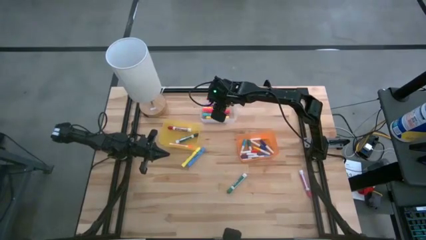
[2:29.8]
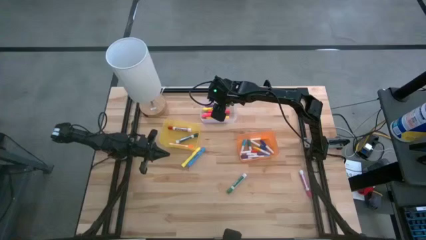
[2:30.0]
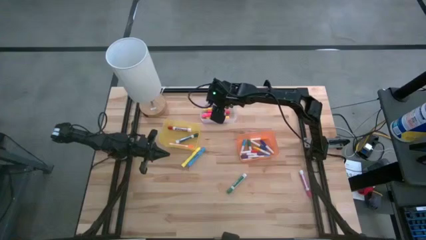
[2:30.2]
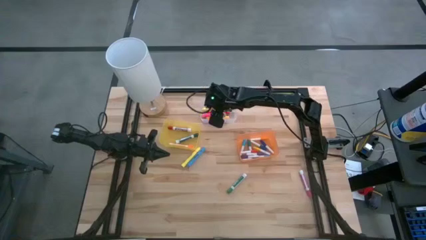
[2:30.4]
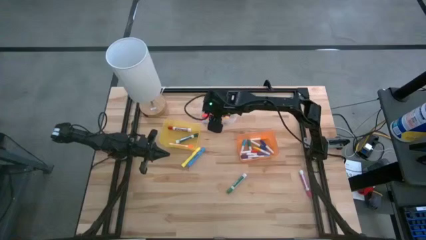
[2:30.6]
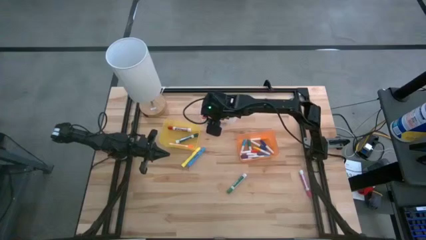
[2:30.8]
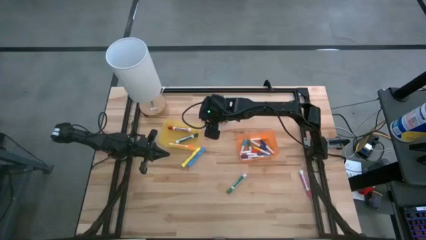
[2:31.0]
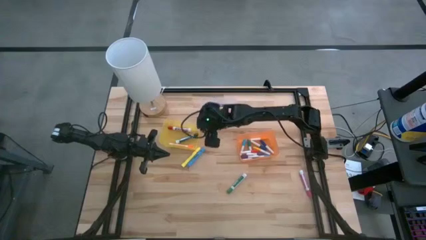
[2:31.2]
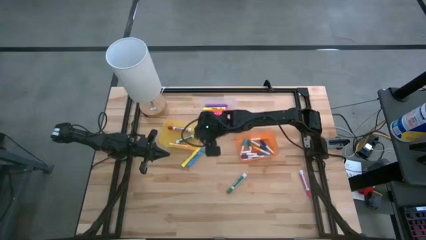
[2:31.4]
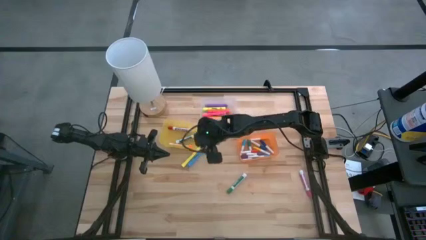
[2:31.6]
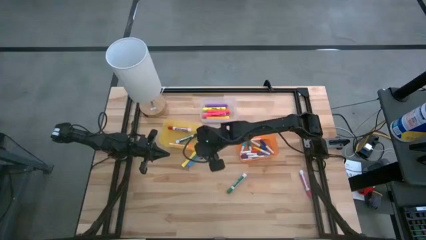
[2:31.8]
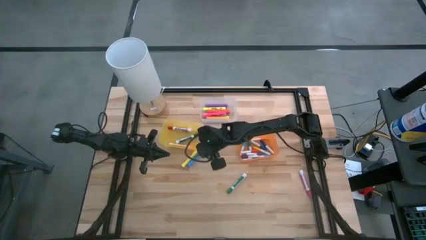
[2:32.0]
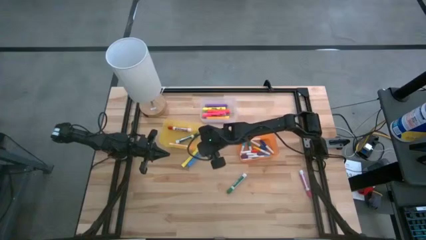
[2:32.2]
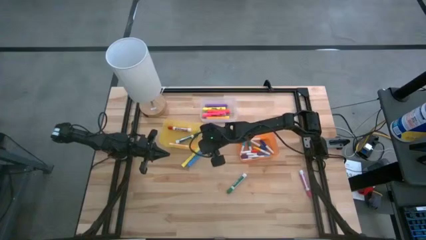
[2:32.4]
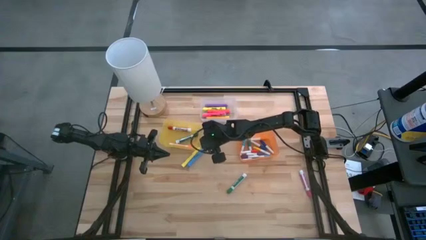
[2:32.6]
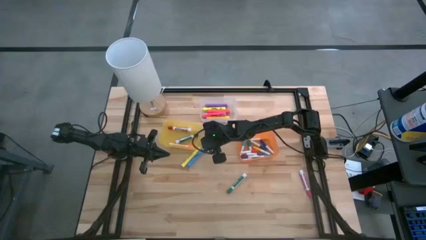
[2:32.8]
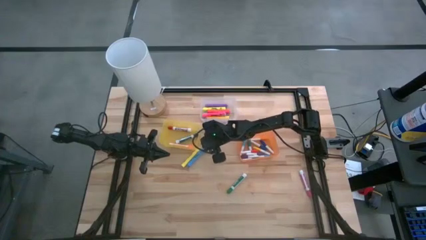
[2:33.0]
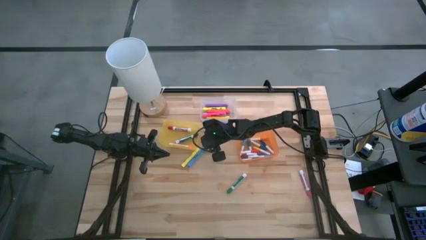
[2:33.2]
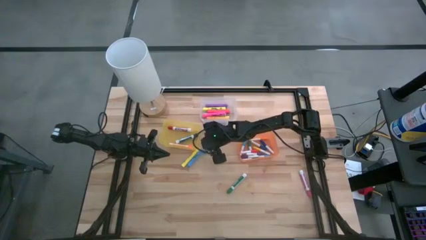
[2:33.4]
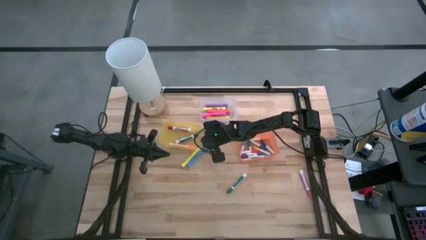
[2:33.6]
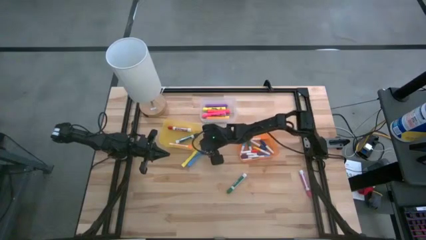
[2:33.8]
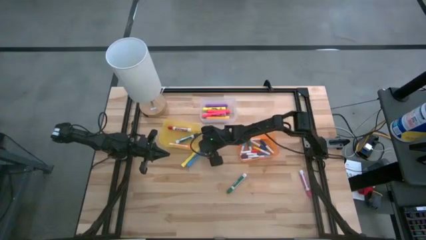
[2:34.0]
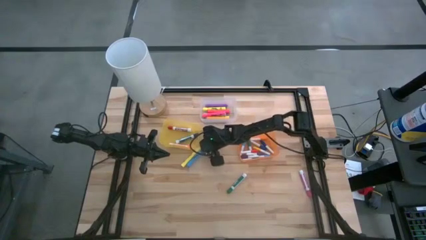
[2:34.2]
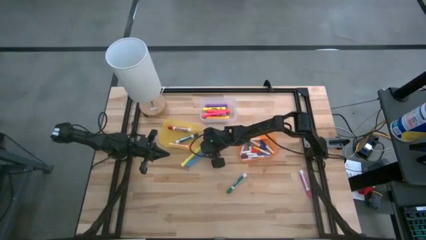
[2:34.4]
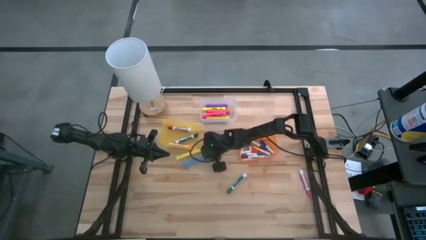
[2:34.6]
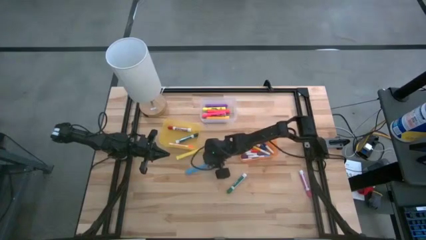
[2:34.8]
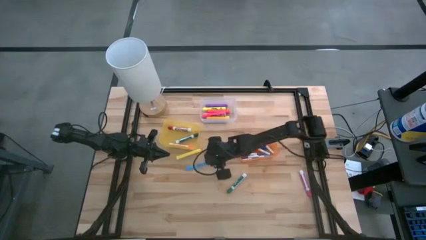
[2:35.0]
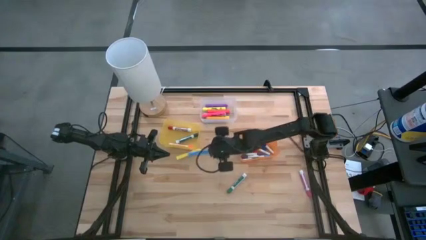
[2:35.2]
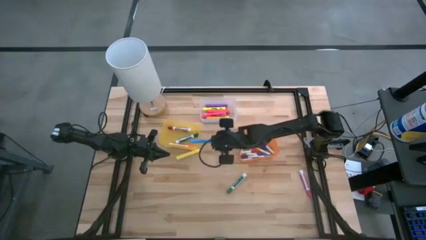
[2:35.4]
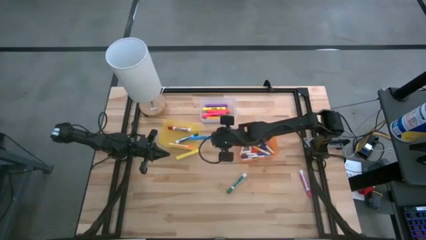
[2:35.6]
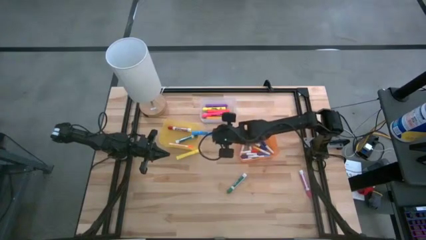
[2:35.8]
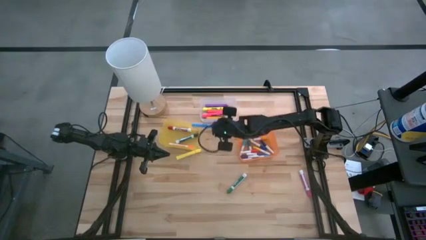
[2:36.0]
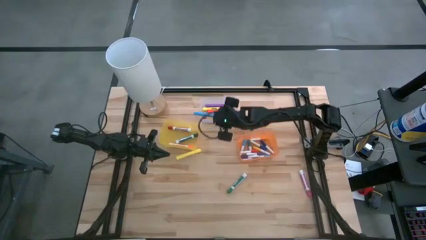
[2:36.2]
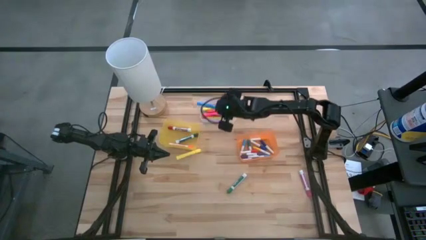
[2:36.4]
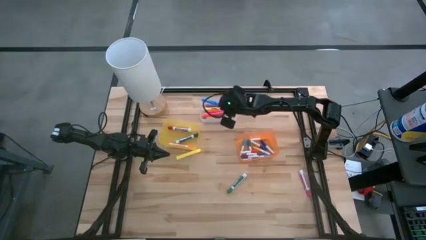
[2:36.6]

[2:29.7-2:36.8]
Task: Pick & Place Markers
Put the large blue highlighter pen into the transparent bin

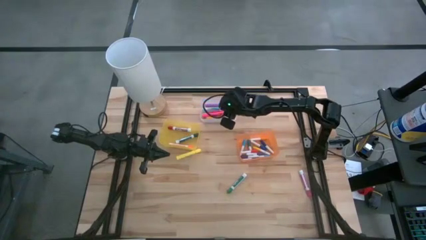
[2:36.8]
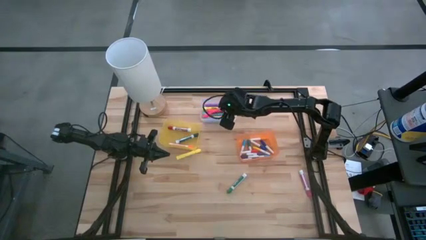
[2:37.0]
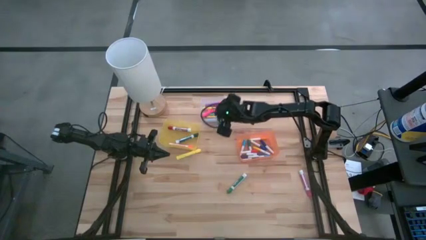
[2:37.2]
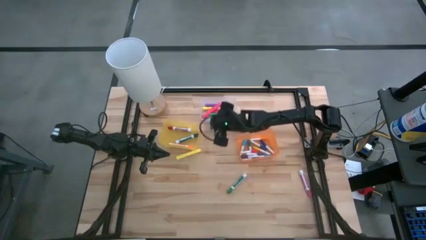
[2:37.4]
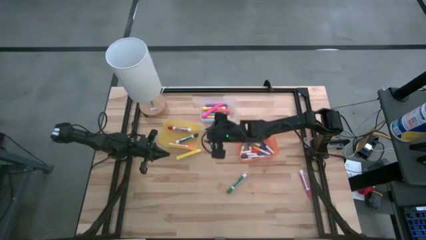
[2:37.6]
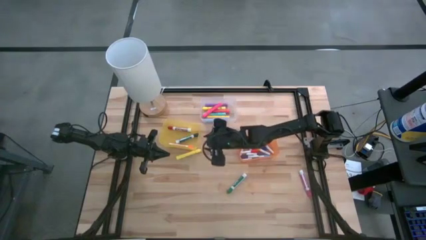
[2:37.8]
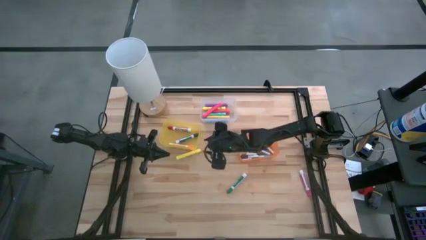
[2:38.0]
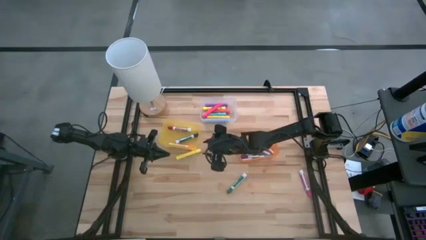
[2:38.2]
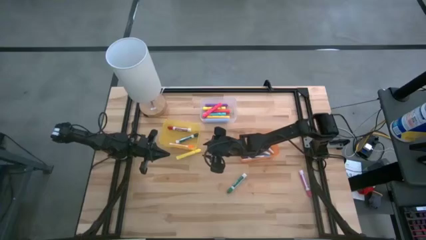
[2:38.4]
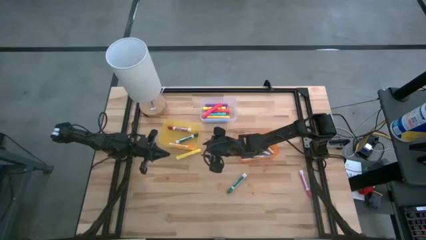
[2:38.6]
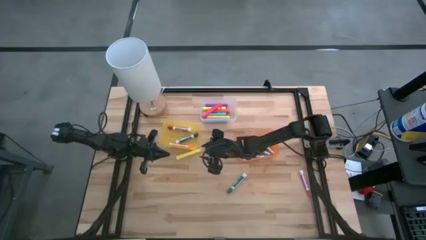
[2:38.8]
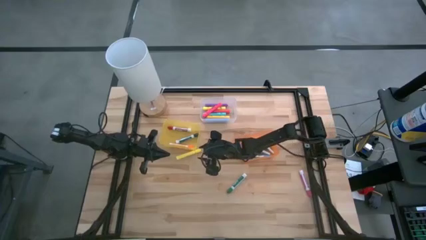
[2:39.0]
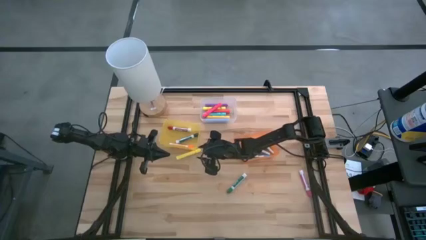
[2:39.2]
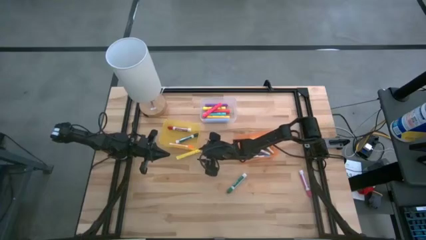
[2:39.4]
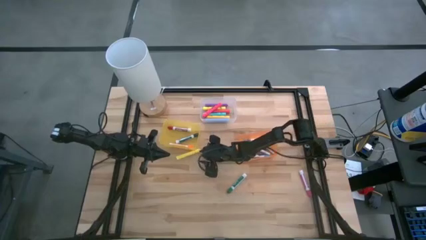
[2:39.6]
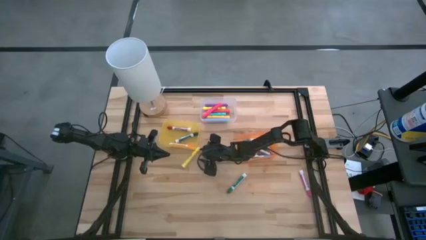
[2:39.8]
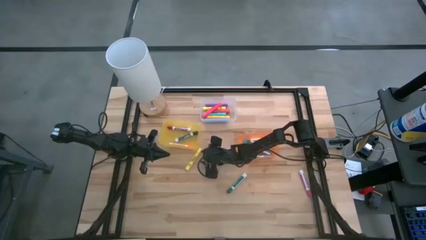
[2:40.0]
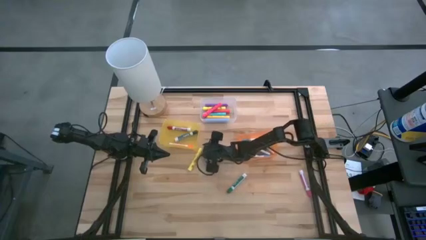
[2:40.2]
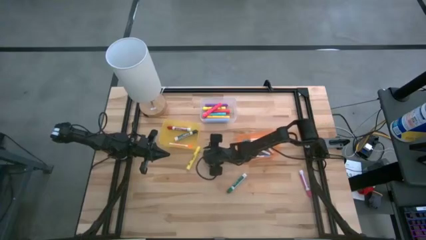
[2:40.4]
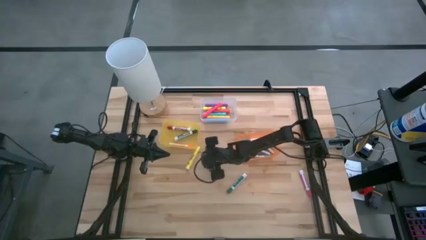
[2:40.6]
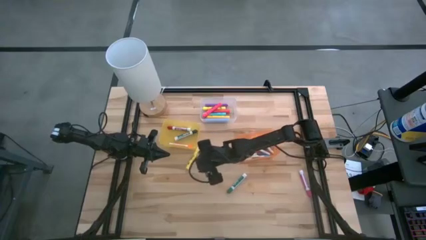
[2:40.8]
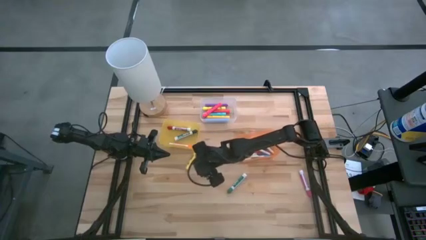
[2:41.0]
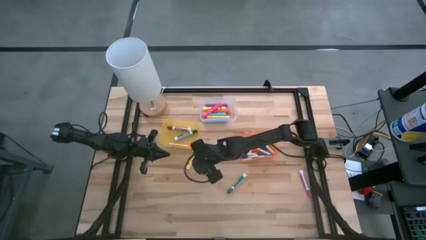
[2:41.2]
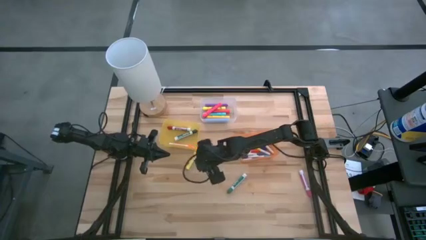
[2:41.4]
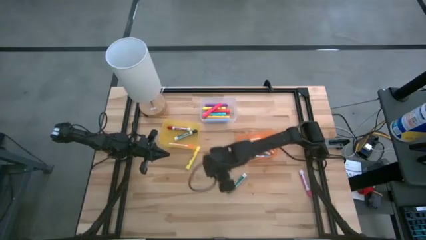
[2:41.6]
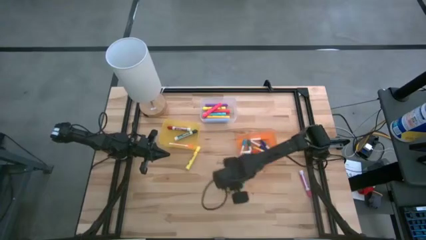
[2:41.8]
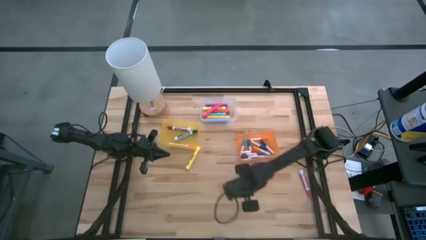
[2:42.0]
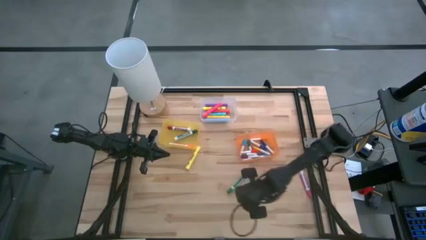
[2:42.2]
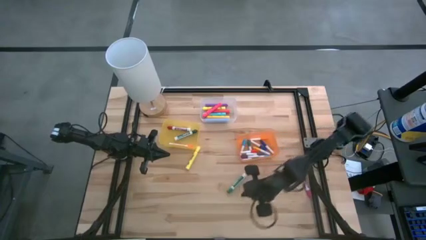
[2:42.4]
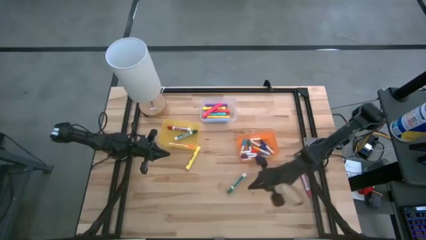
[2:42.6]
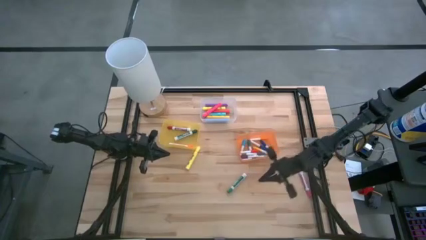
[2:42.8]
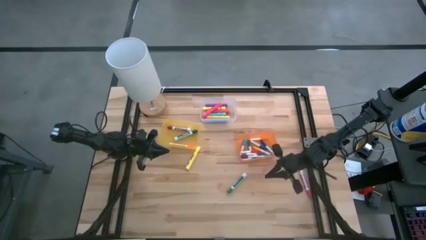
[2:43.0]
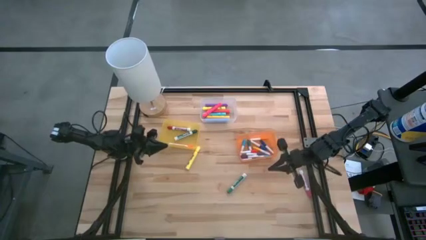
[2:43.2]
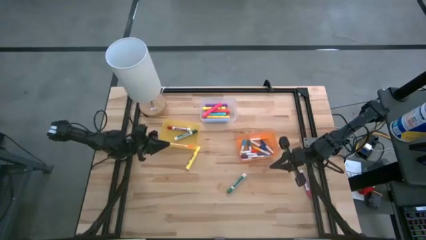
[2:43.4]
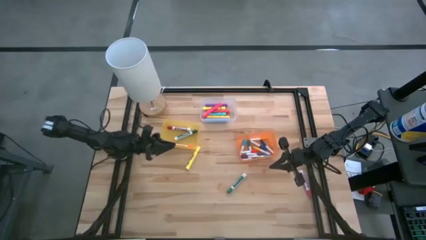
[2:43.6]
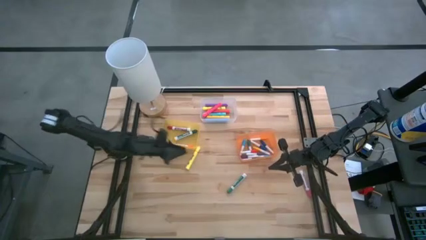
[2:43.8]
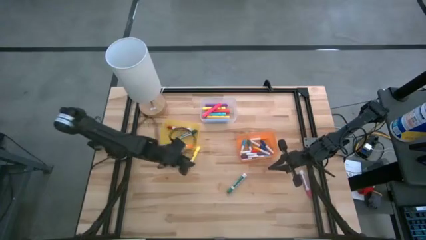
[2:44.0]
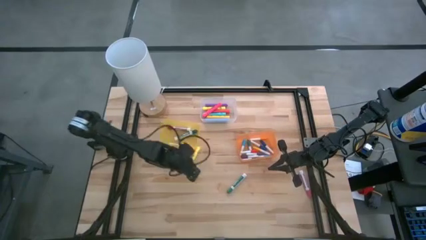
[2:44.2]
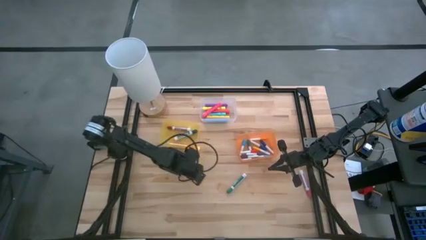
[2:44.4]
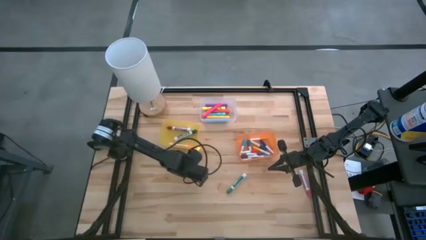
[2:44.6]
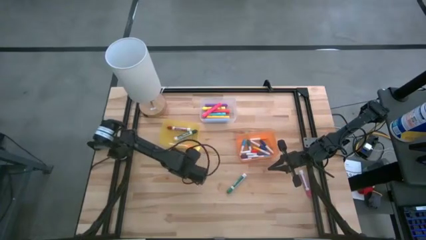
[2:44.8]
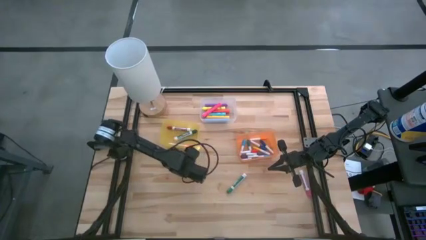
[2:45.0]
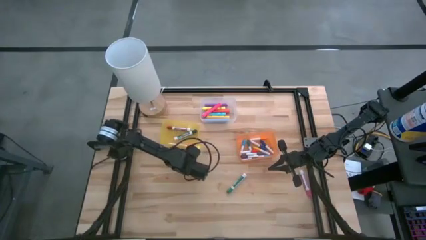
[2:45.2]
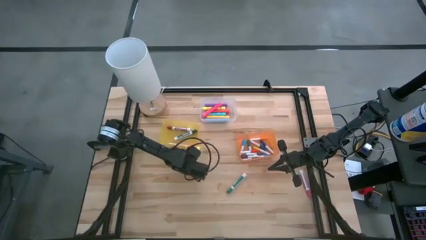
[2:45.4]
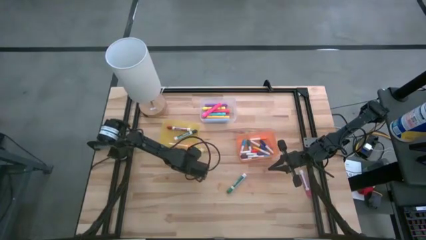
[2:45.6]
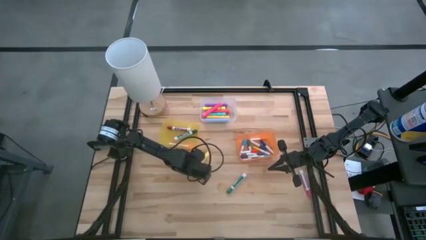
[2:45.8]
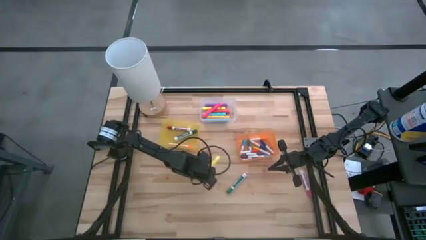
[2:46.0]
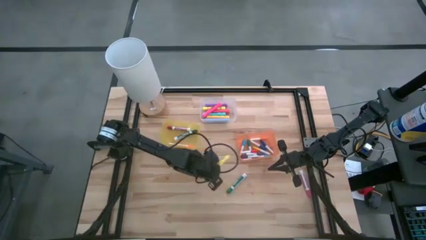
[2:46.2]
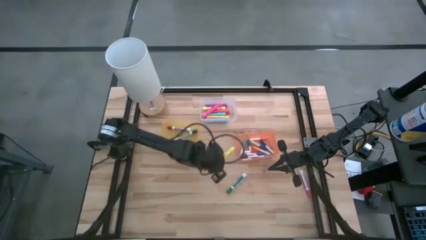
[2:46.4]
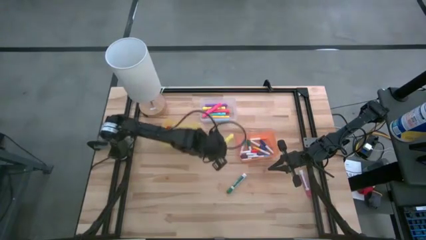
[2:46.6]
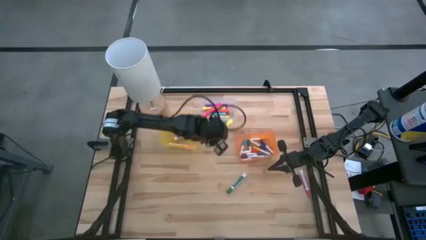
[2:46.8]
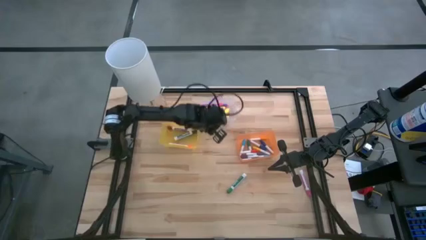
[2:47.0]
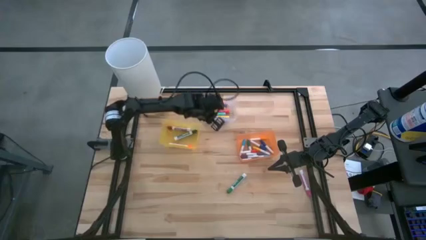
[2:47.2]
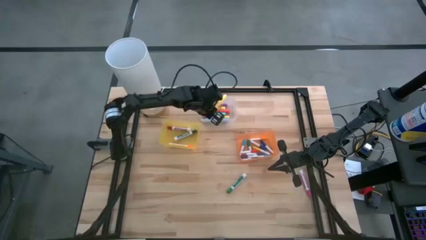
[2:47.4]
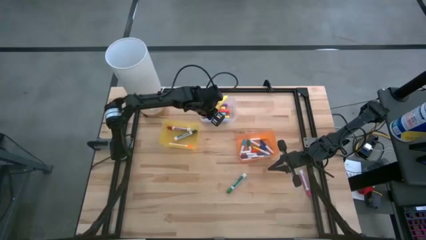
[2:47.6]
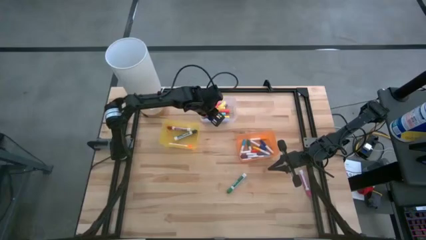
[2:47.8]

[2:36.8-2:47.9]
Put the large yellow highlighter pen into the transparent bin
